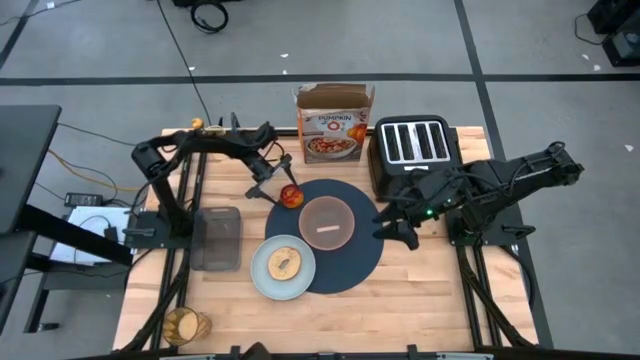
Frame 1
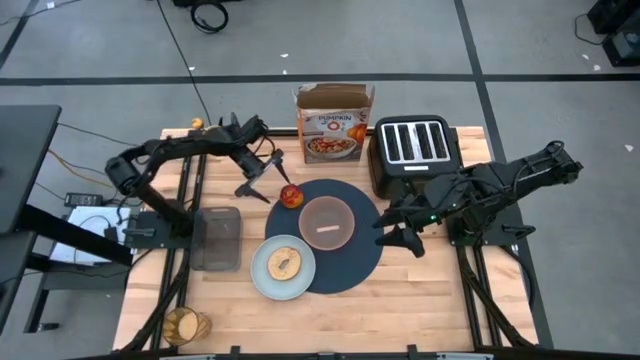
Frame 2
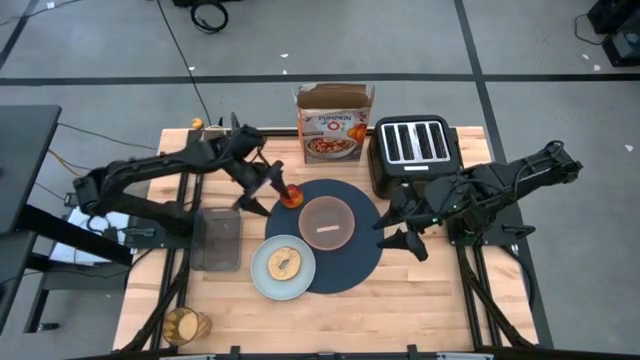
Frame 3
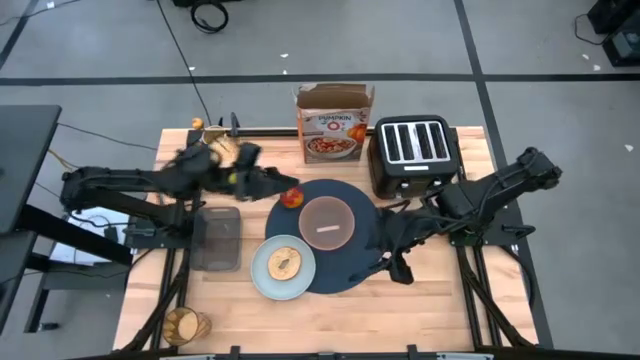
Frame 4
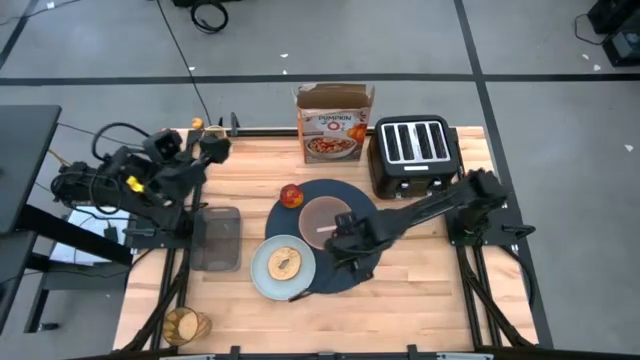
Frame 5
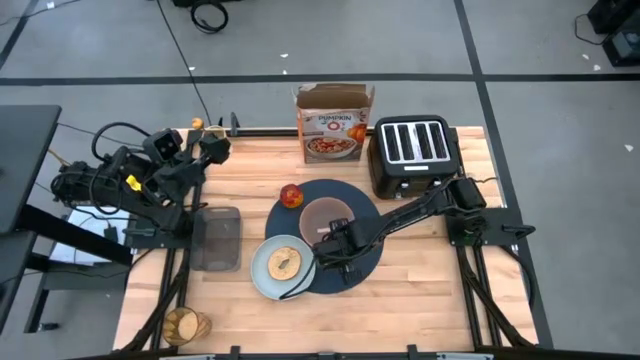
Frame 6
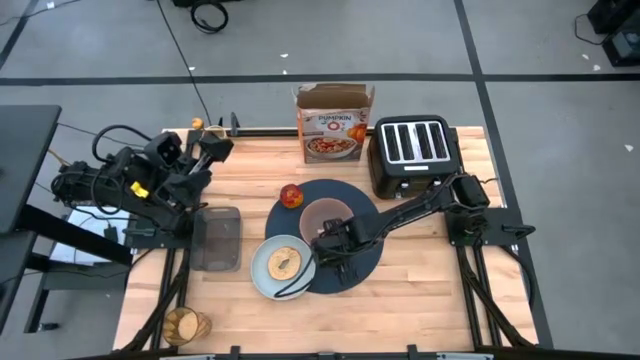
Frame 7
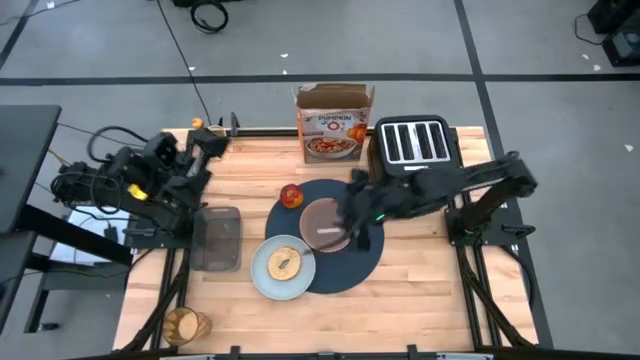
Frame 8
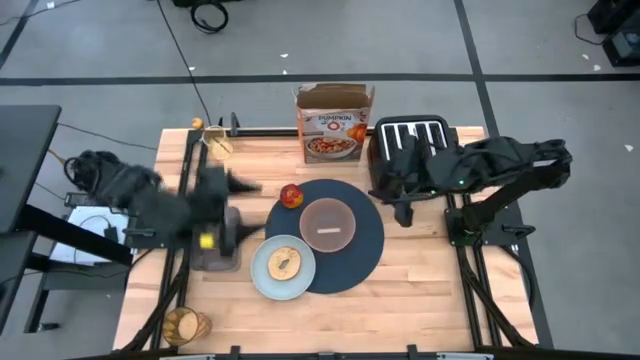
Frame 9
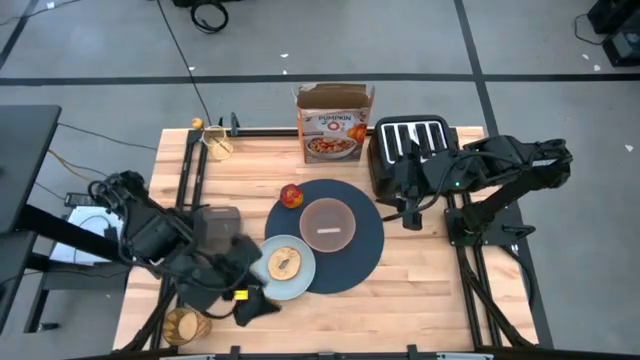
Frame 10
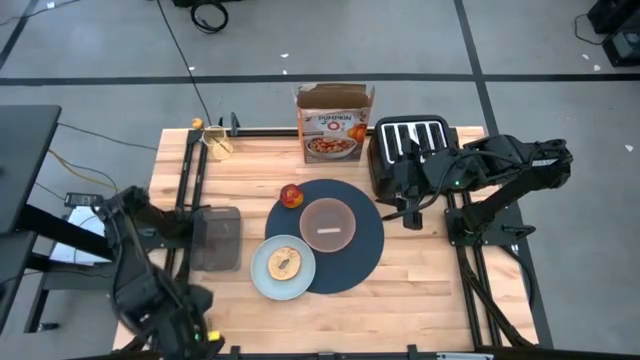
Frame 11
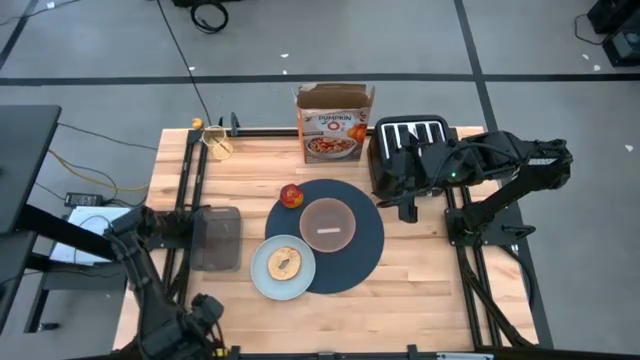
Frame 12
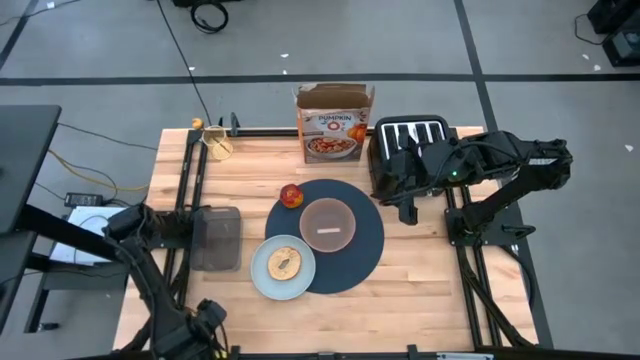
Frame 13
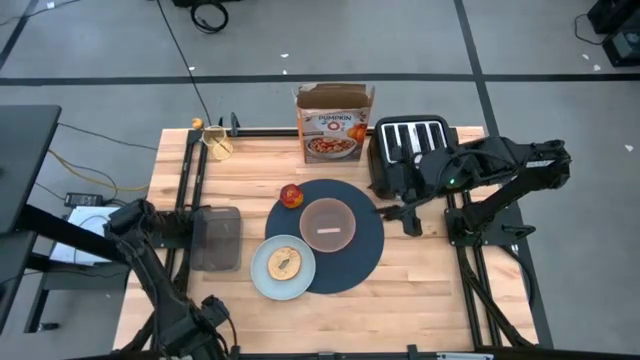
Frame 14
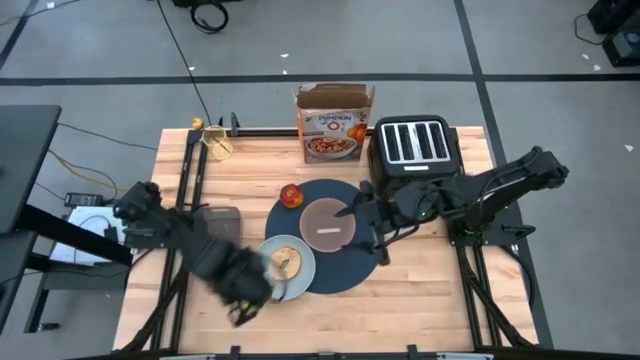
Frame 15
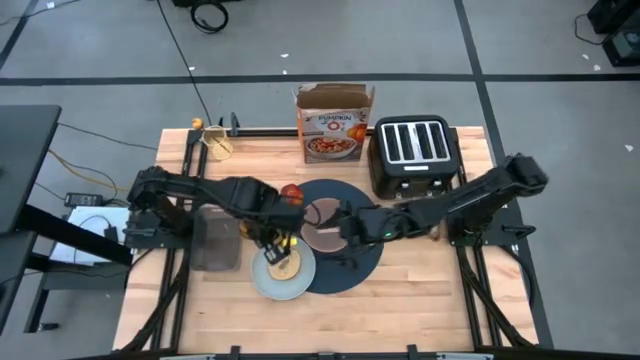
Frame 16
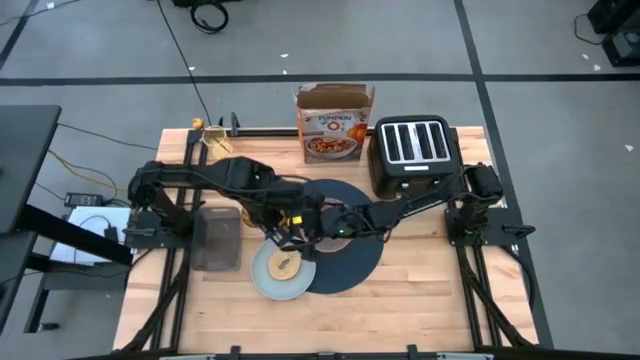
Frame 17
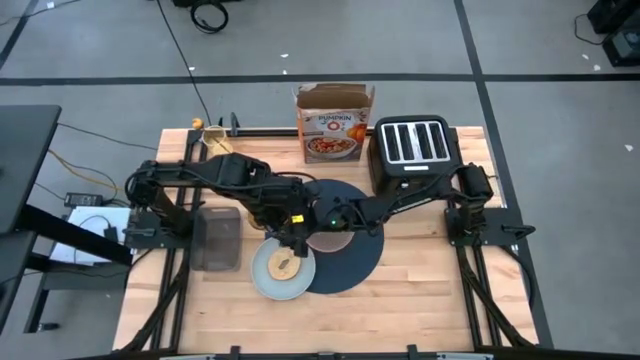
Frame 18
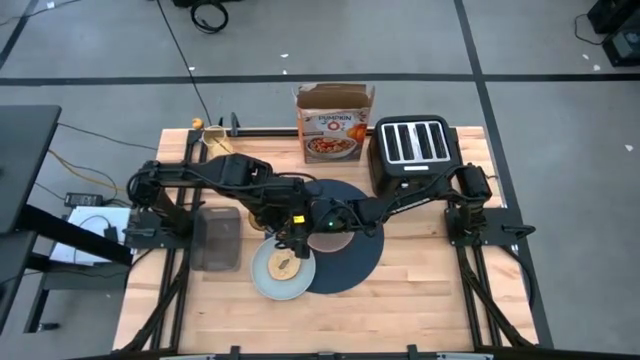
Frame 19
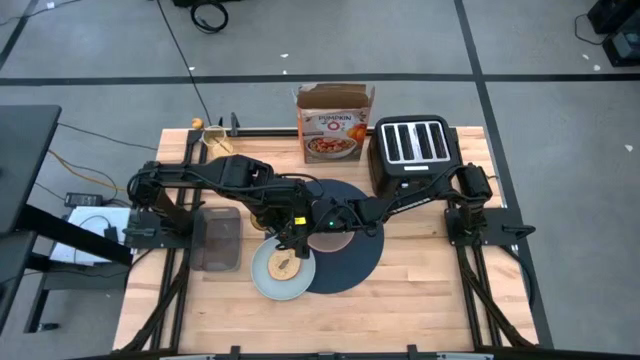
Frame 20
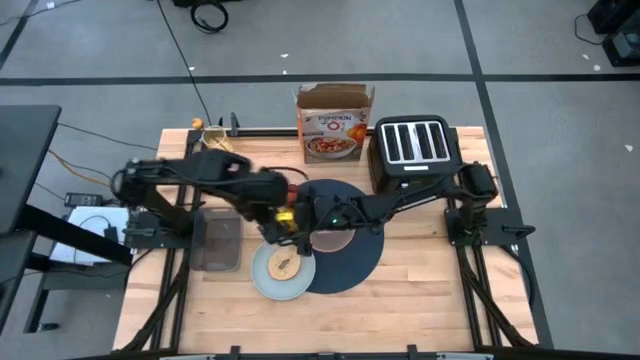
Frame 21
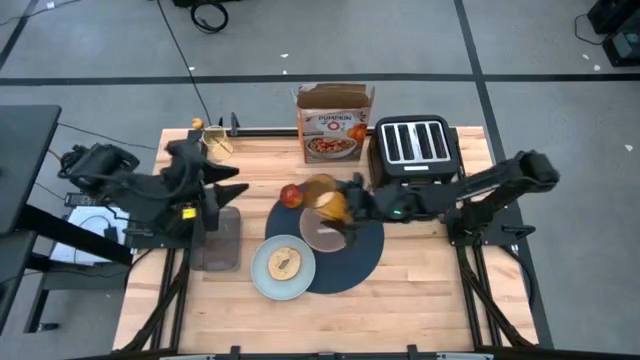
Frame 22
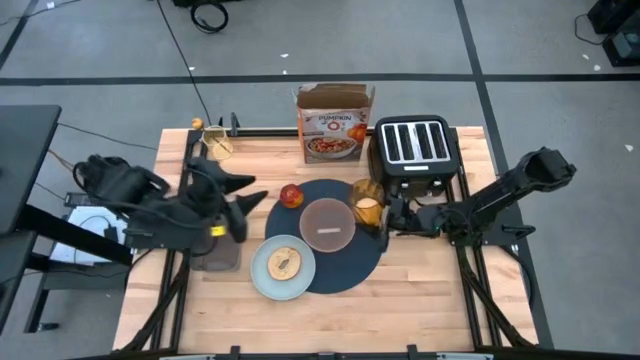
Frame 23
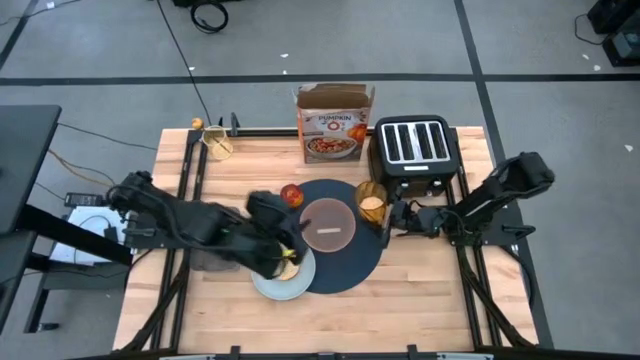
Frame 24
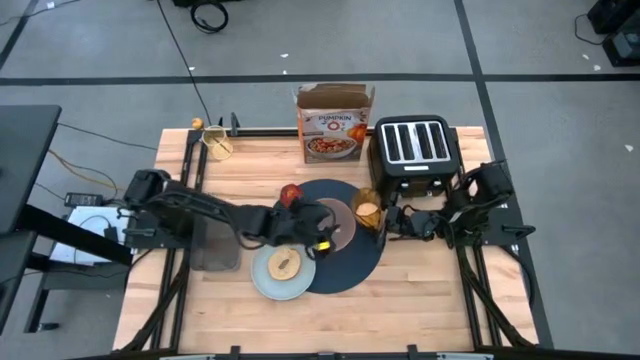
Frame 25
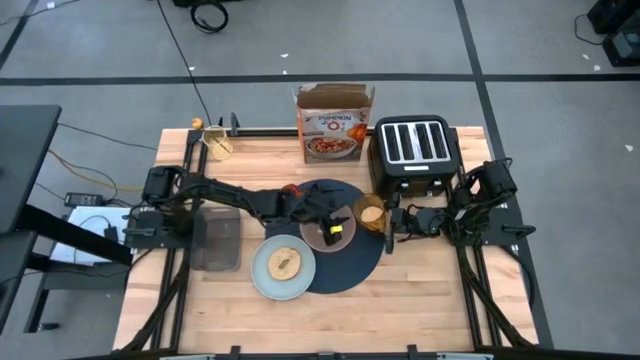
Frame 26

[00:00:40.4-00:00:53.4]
Task: Arrange a breakfast setting
Put the brown cup with rice on the dark blue tablemat to the to right of the orange bowl

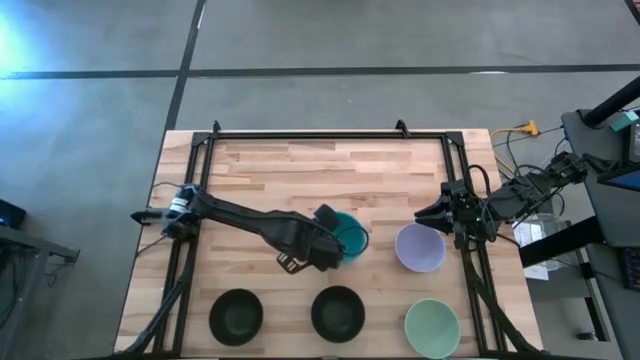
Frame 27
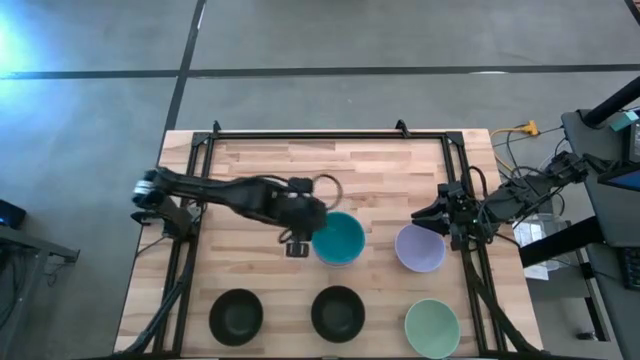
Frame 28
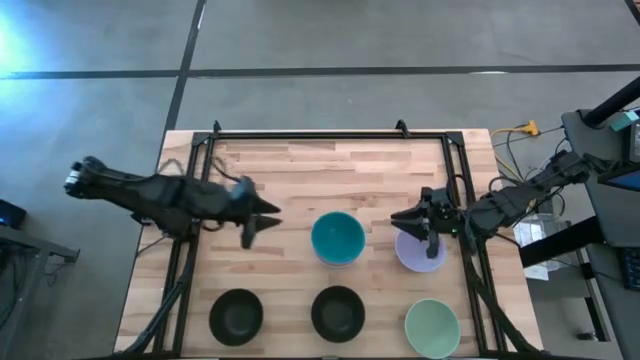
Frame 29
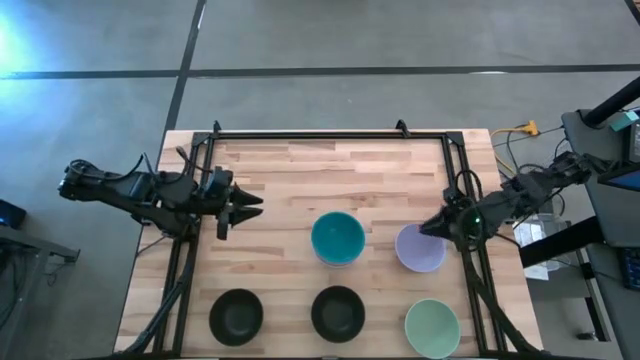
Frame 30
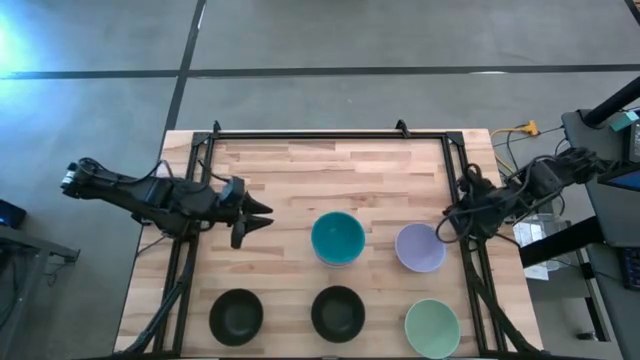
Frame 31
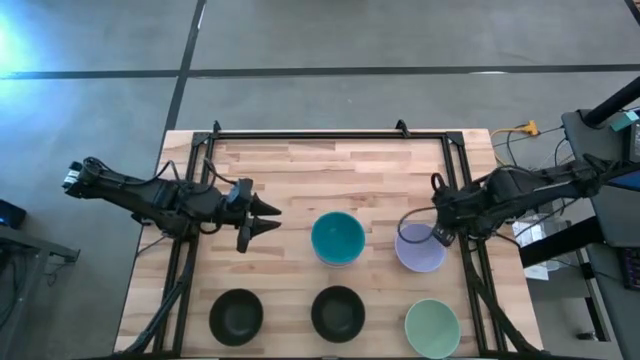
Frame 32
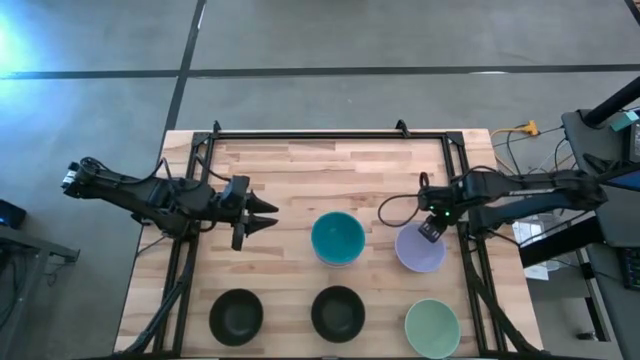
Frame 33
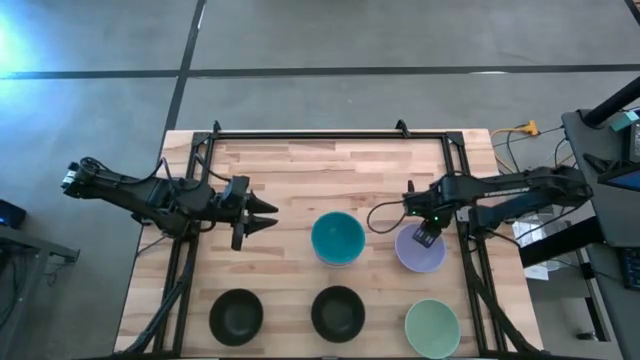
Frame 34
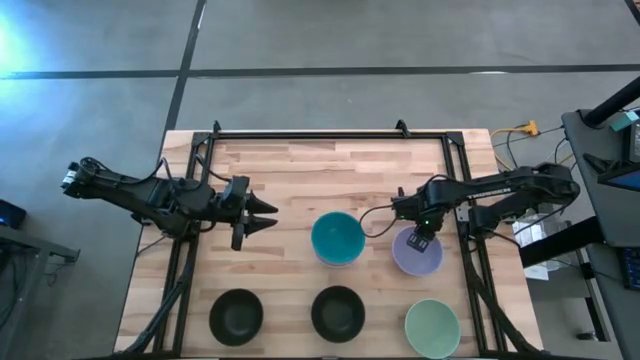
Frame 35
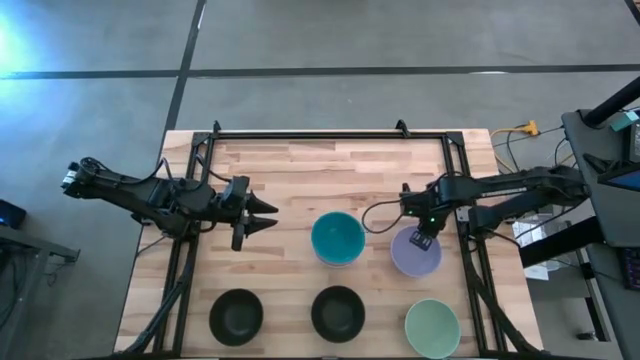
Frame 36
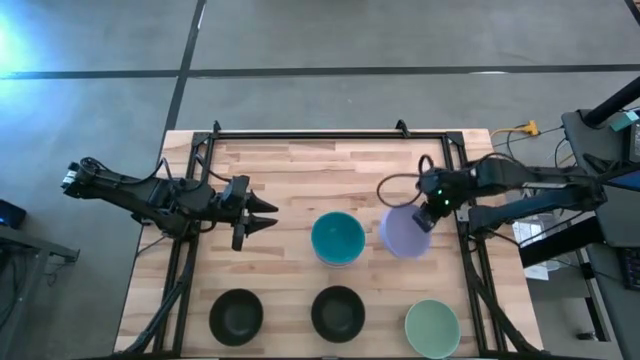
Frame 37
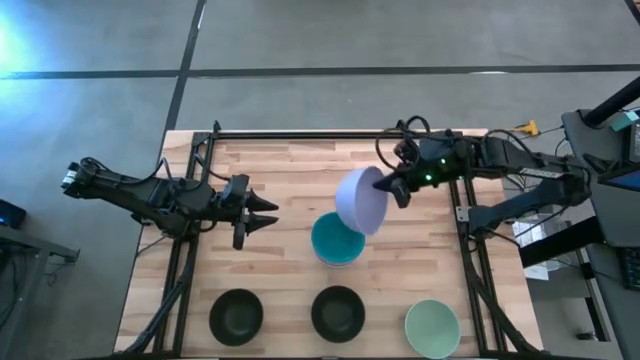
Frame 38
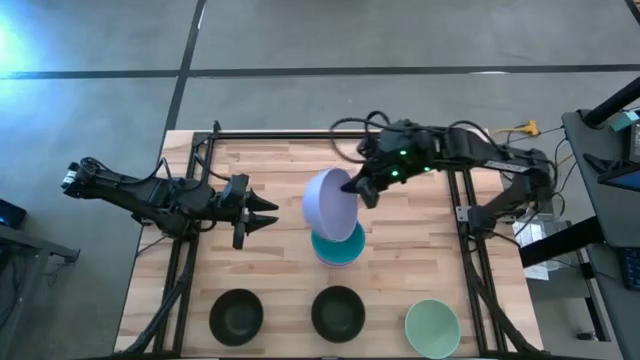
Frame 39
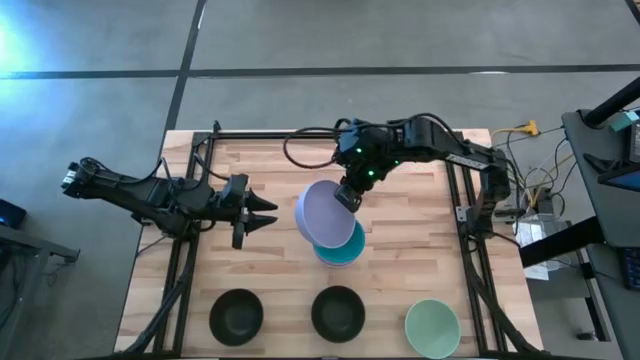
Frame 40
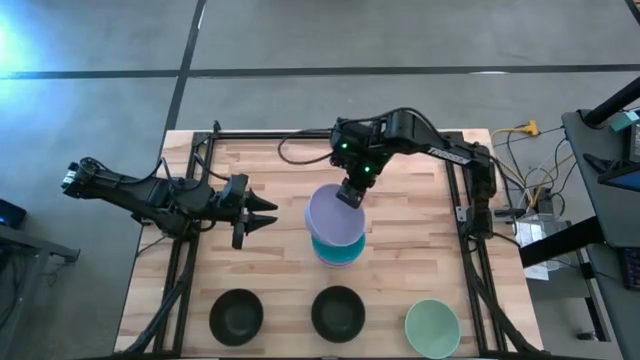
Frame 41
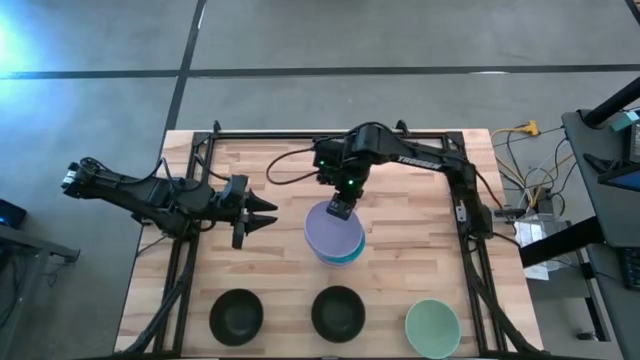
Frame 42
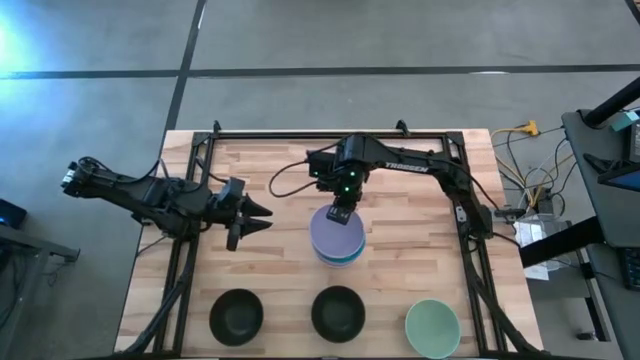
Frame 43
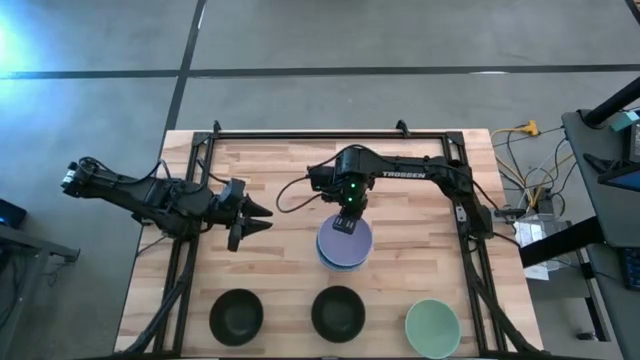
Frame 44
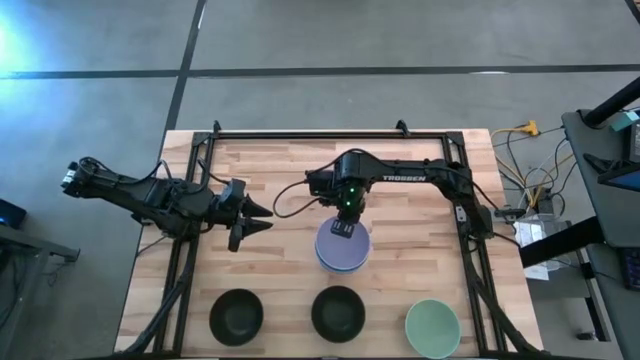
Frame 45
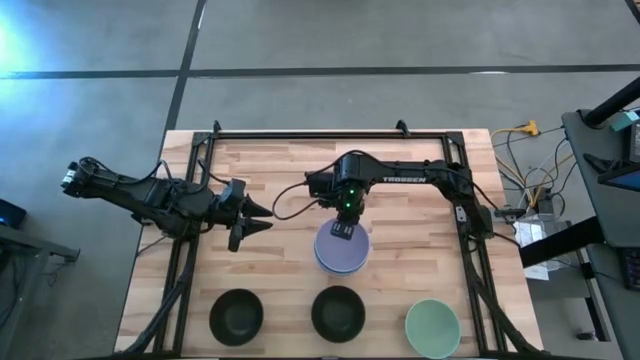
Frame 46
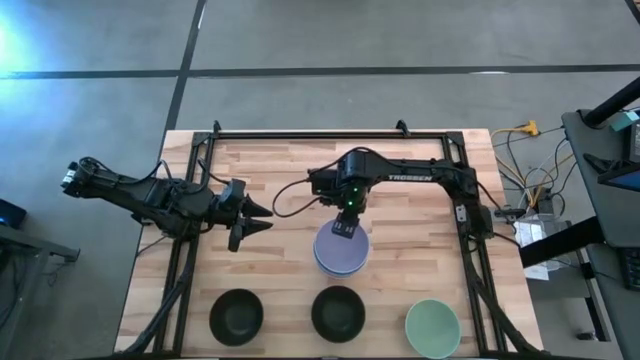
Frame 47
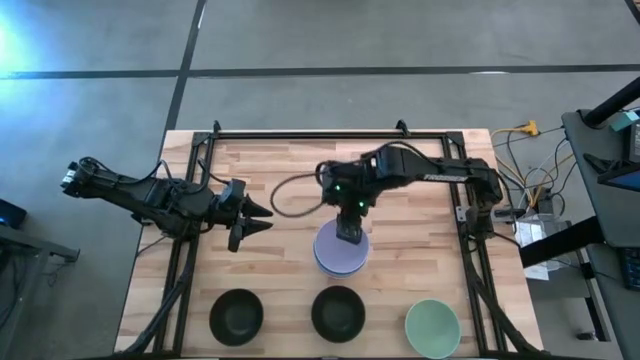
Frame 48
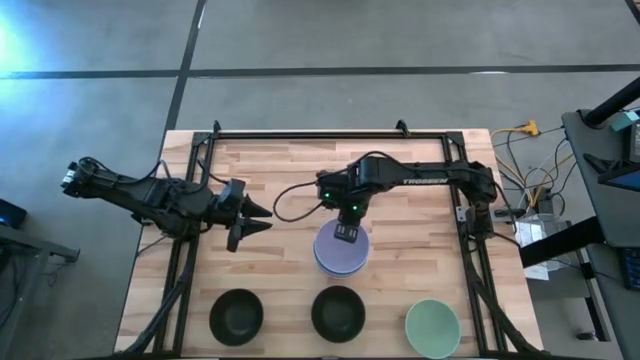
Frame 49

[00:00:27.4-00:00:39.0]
Task: Nest bowls inside each other
Stack the purple bowl on top of the blue bowl
